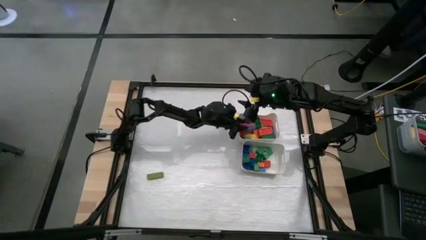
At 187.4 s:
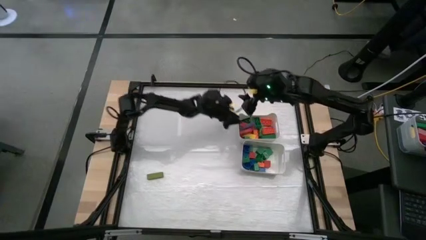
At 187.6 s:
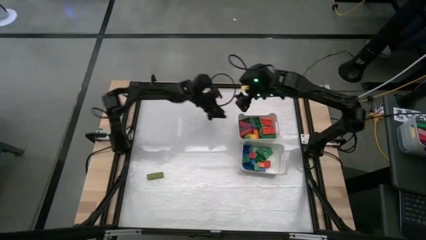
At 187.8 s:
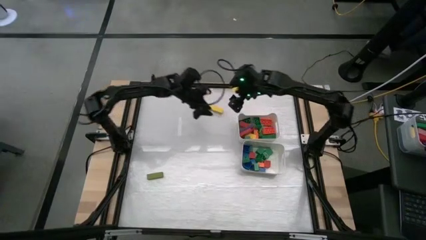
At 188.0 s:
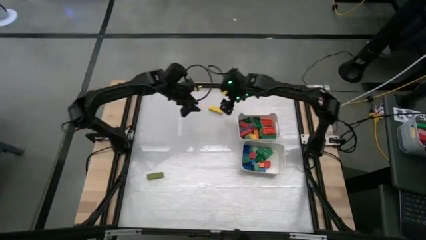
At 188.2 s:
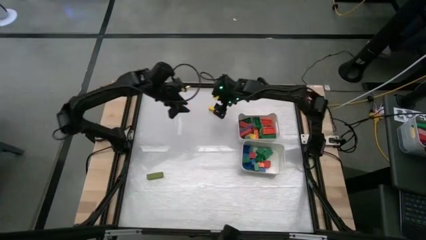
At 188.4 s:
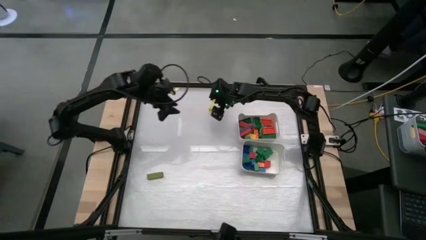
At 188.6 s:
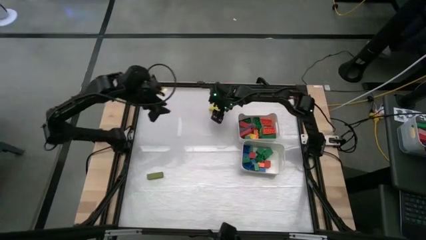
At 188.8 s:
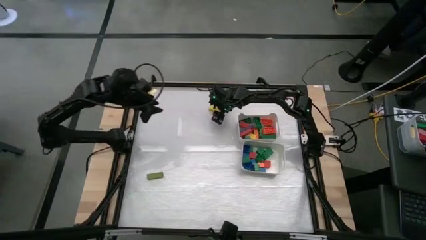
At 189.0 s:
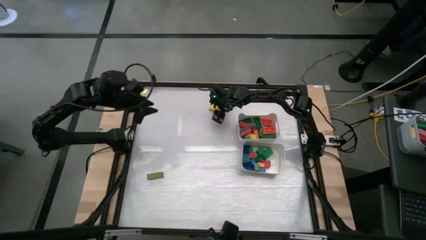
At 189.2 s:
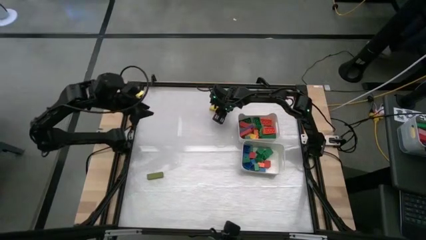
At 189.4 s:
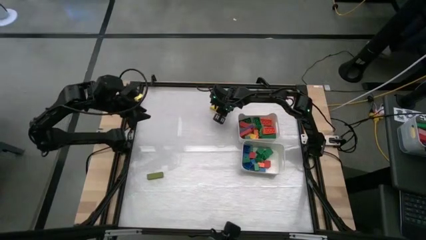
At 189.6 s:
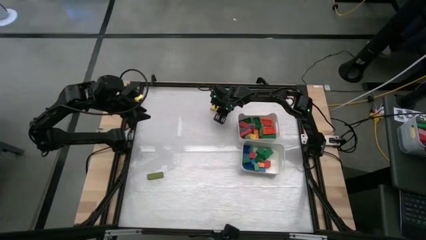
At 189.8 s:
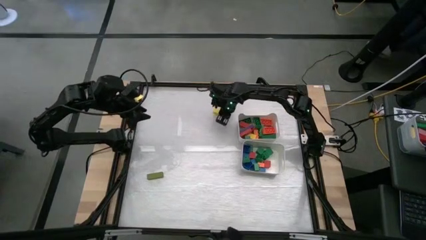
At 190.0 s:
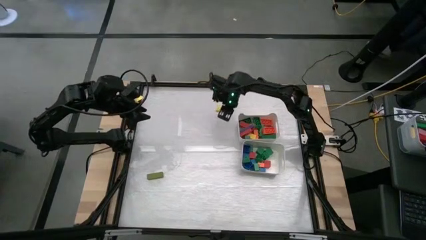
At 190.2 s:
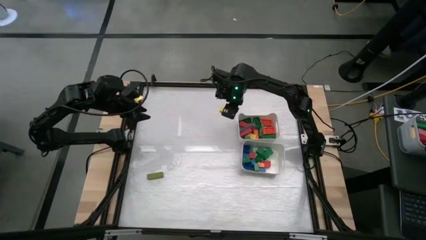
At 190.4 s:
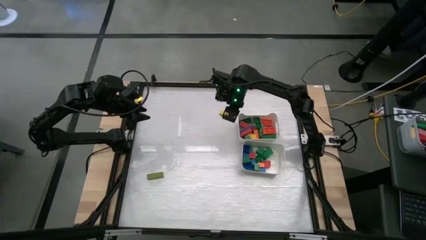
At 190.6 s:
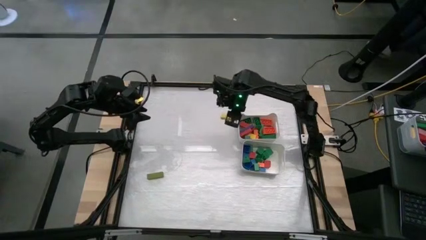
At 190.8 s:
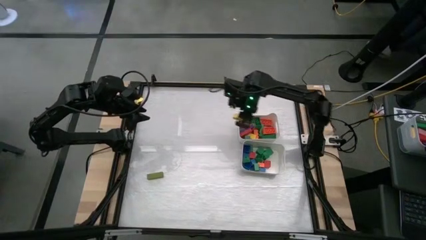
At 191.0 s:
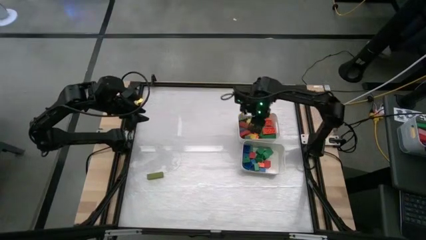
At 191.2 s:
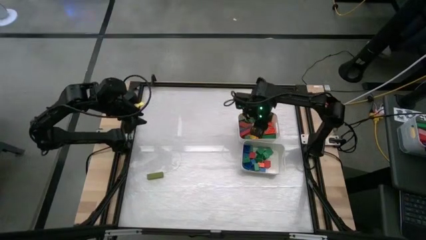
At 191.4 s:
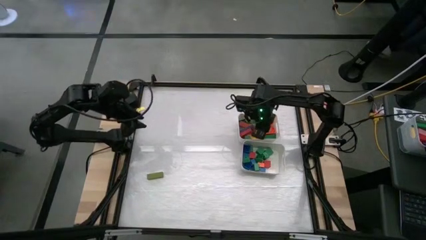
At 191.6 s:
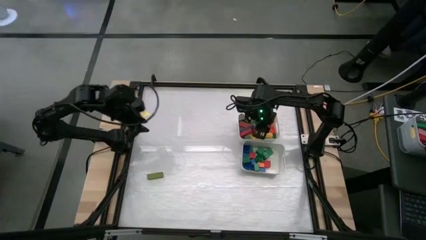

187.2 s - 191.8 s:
Task: Sort blocks by size
Put the yellow thin rectangle block into the top white bin

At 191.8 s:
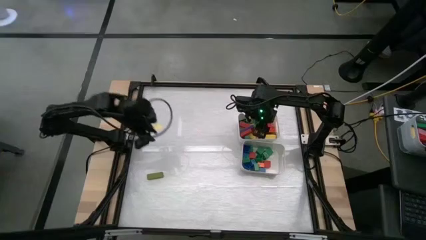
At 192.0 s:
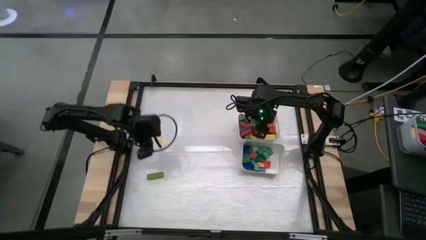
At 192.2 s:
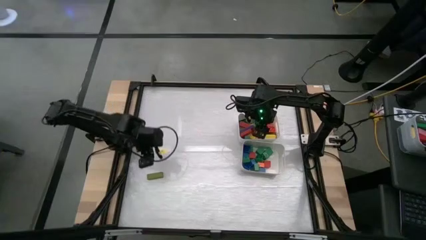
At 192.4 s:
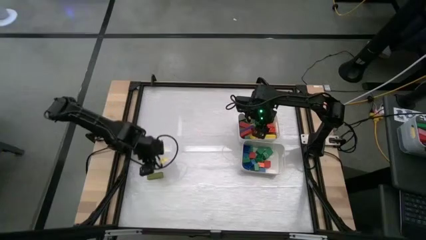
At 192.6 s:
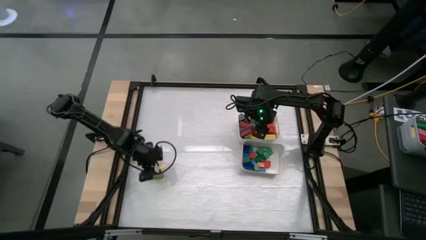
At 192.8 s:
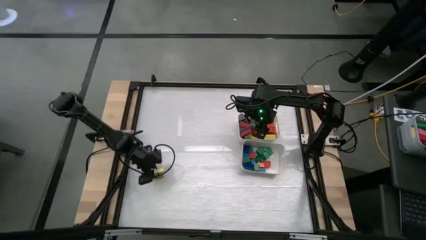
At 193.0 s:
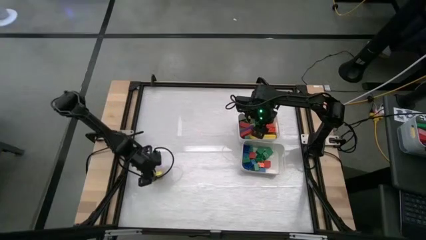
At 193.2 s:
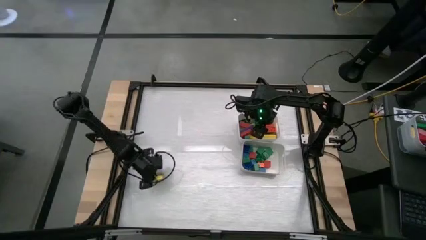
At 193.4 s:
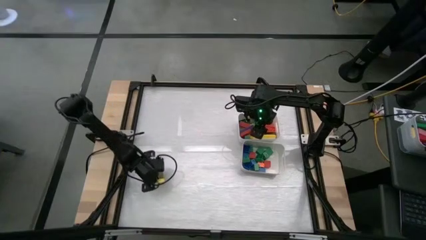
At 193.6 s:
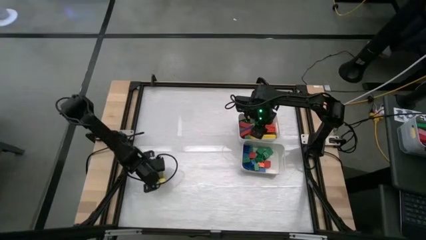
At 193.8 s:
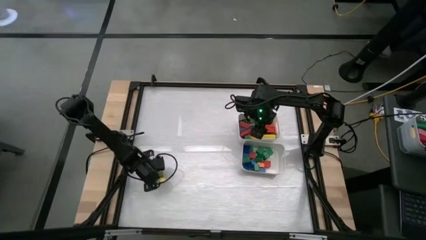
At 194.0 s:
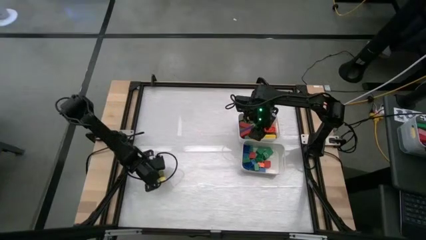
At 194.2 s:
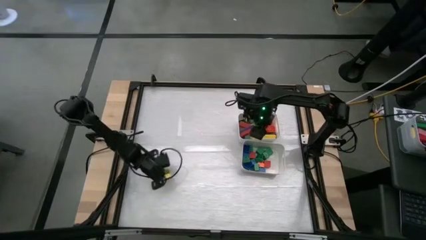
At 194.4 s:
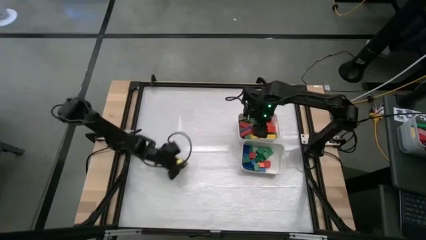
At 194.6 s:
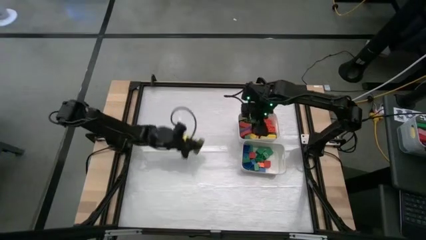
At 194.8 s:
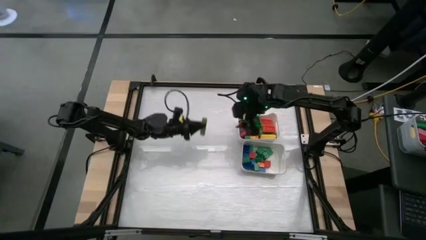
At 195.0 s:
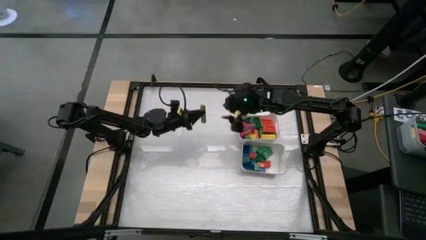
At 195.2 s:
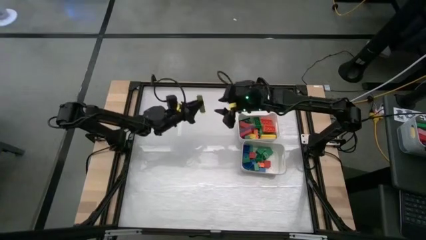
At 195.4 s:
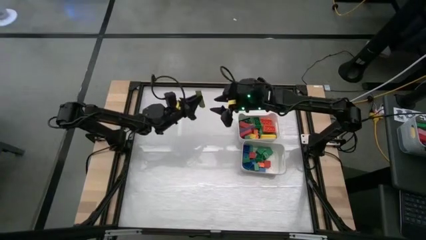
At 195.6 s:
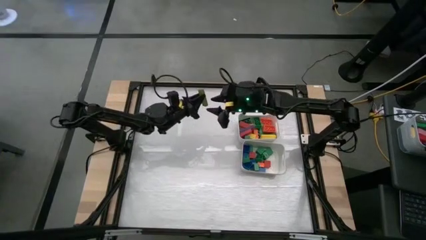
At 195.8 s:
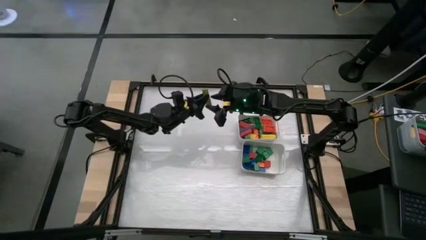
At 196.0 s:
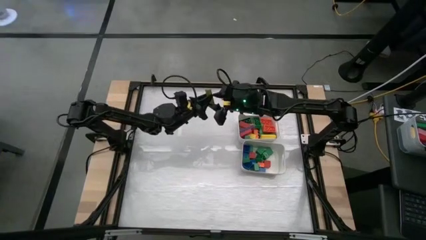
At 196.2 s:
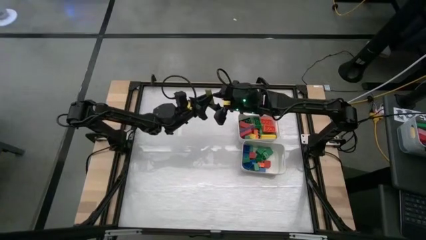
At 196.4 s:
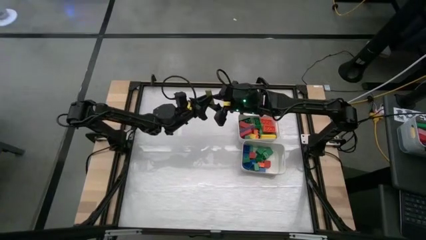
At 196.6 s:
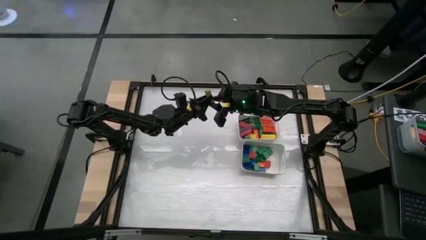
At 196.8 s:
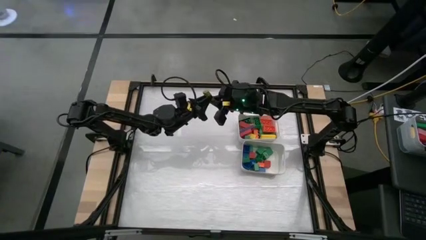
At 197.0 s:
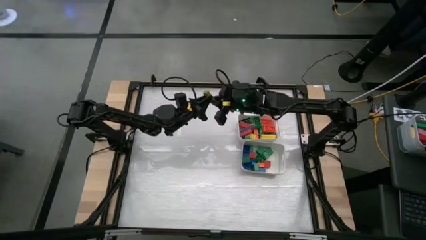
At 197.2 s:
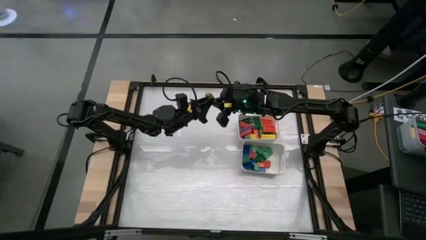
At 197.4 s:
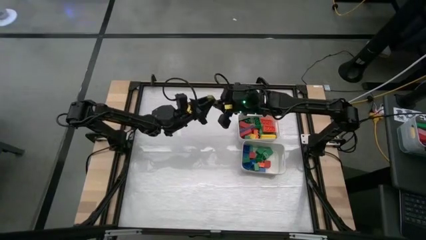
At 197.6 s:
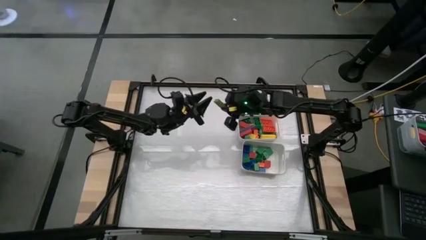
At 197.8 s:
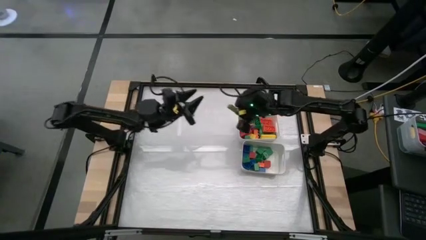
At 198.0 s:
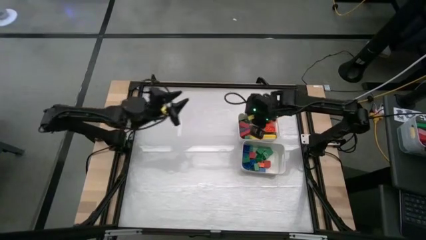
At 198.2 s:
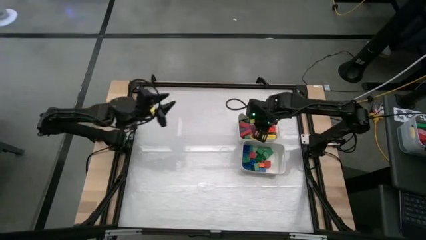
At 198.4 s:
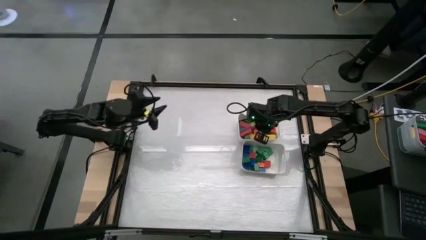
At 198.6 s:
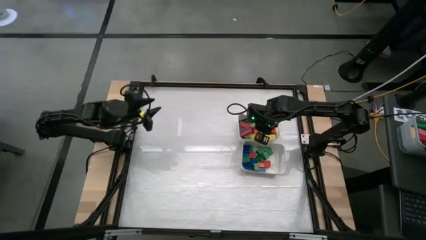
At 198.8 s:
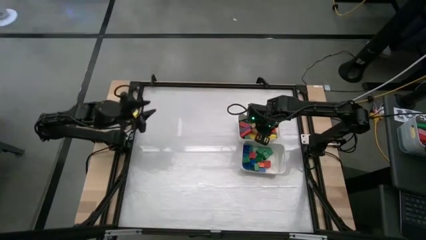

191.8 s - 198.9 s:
Put the green thin rectangle block into the top white bin

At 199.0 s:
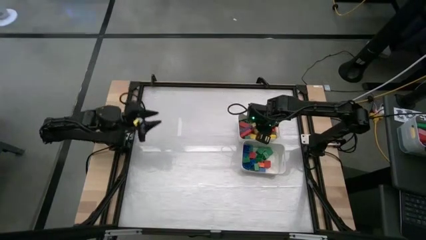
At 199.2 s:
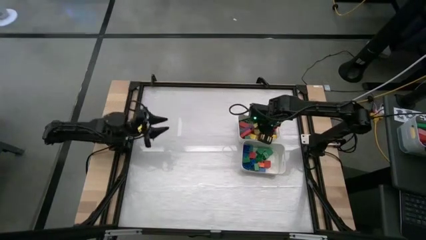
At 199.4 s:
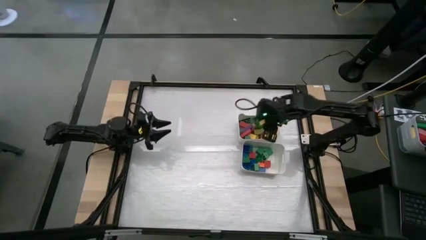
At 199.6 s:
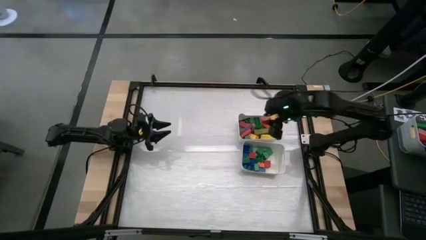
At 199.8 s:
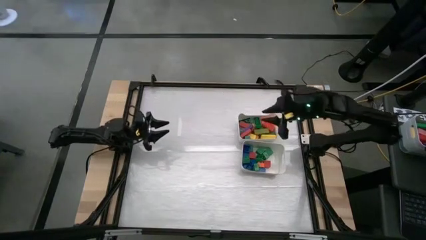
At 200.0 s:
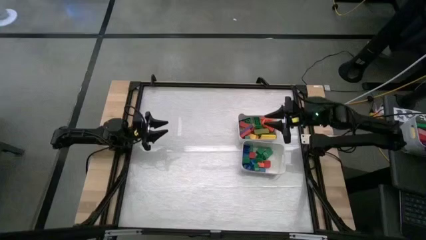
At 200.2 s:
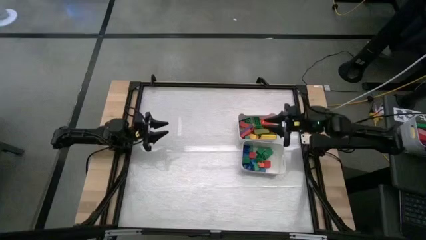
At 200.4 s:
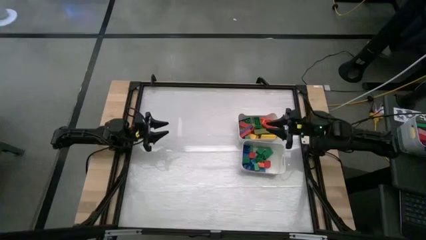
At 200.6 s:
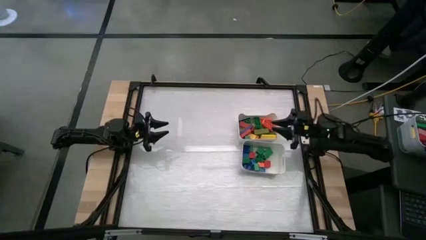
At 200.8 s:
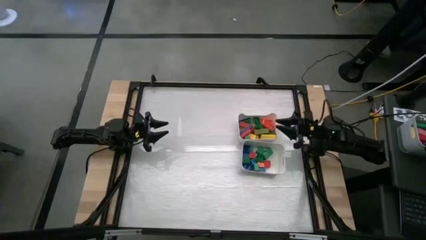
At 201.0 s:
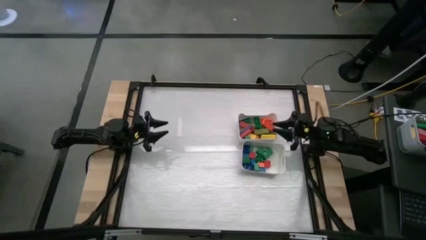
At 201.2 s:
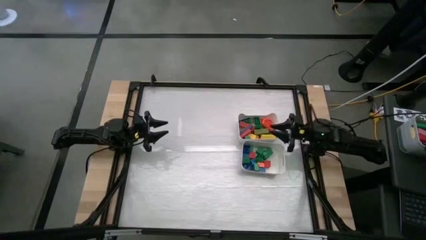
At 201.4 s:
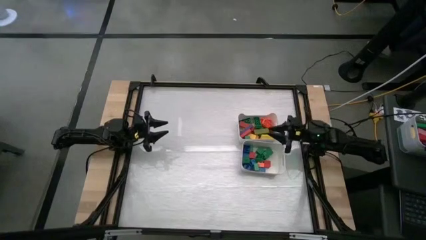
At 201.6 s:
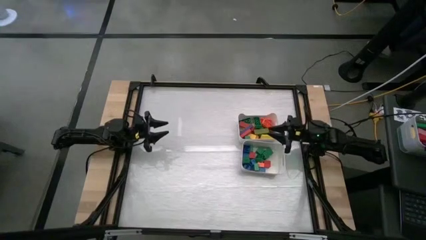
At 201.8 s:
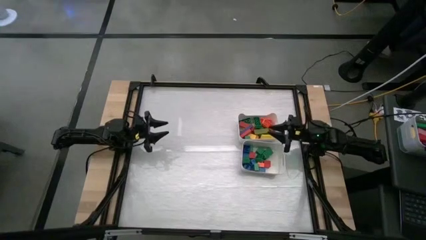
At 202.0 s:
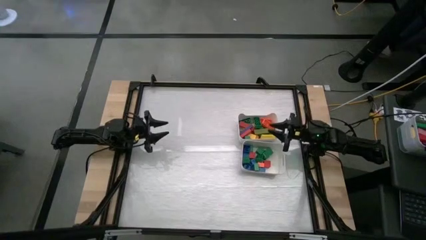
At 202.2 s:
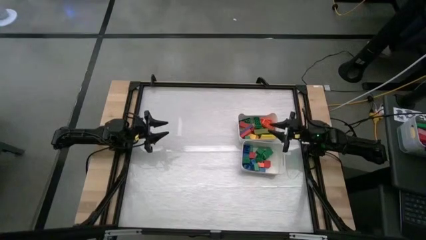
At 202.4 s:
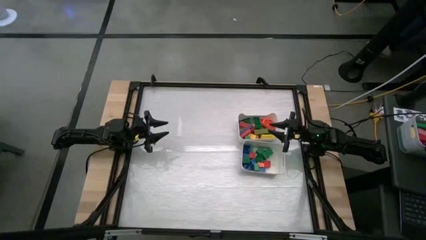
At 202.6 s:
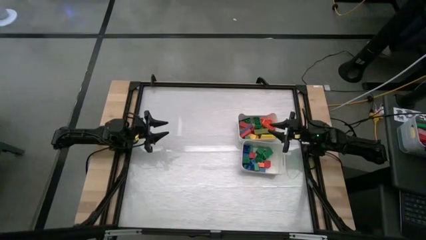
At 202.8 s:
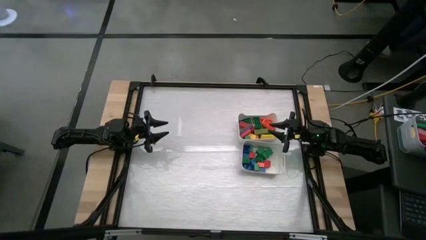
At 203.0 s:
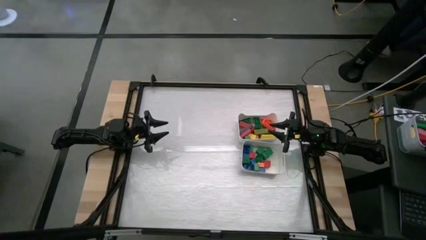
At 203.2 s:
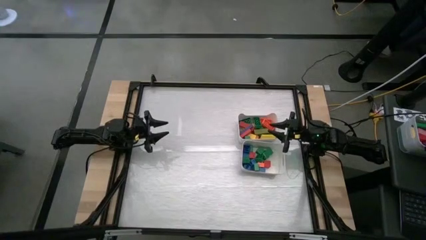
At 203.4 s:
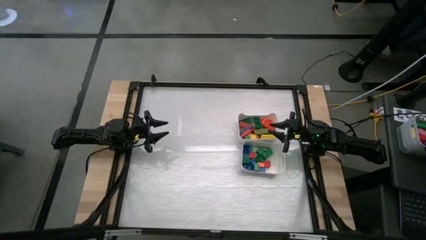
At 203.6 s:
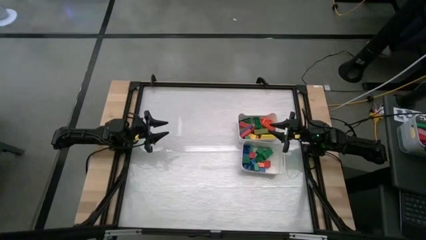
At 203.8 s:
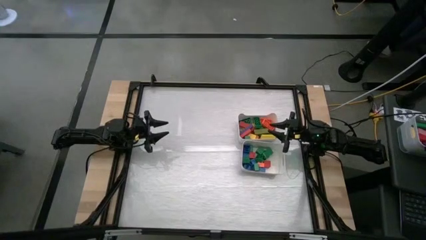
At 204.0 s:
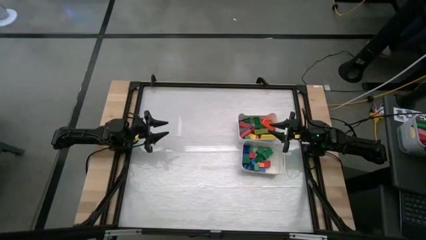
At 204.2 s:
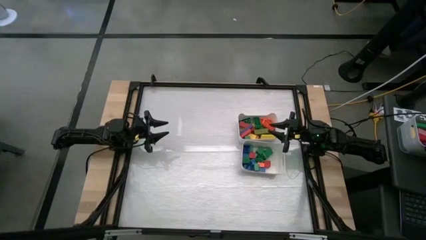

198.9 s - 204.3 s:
Return to Home Position
